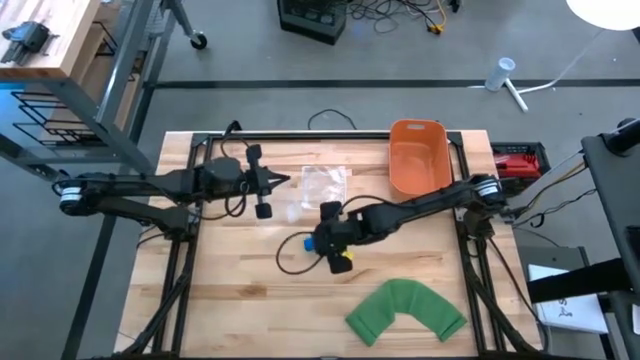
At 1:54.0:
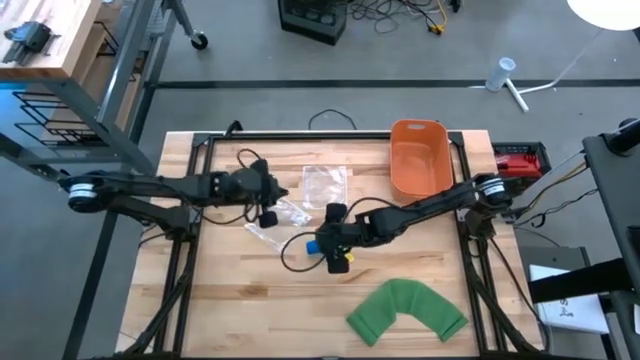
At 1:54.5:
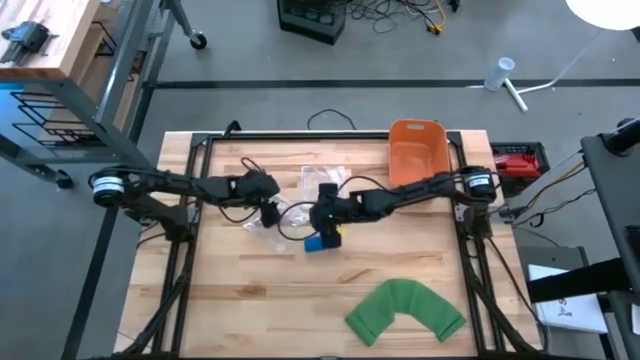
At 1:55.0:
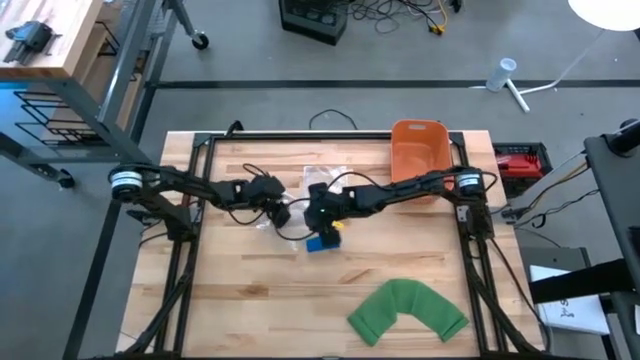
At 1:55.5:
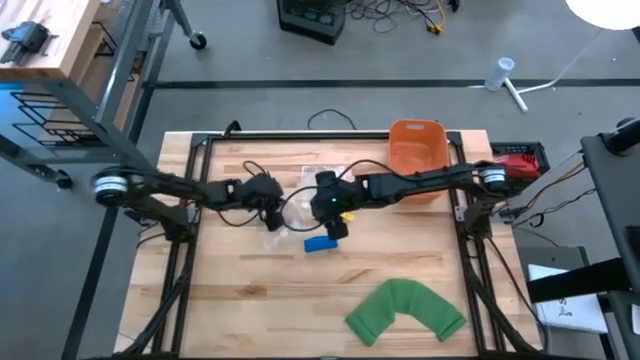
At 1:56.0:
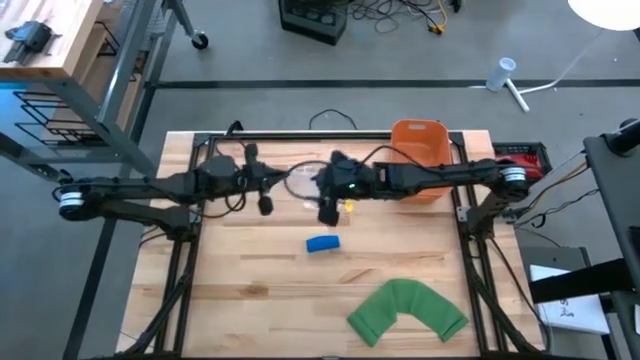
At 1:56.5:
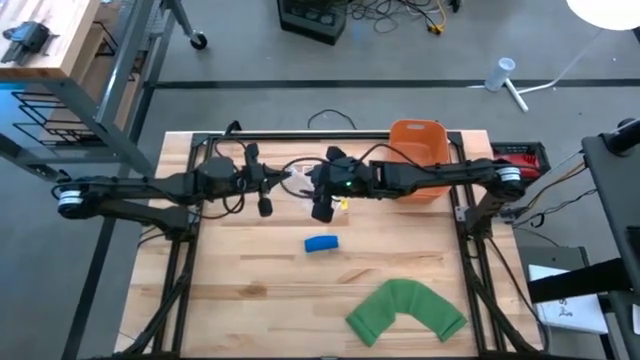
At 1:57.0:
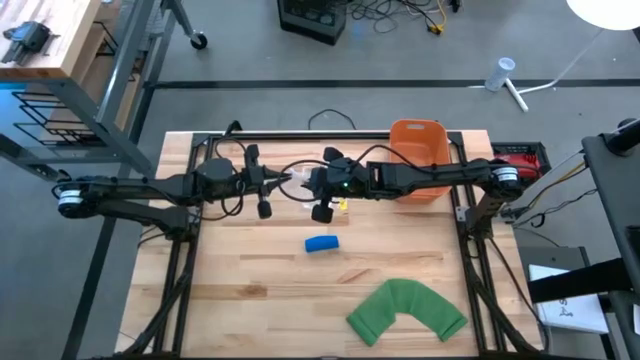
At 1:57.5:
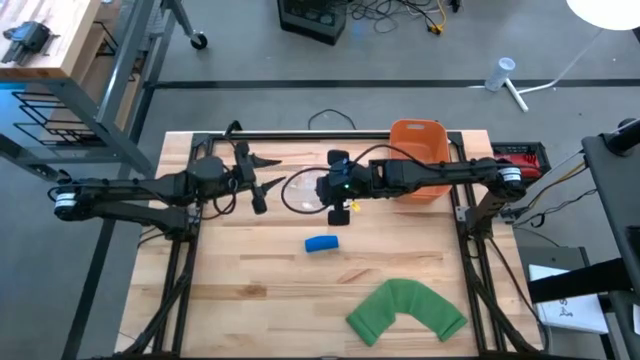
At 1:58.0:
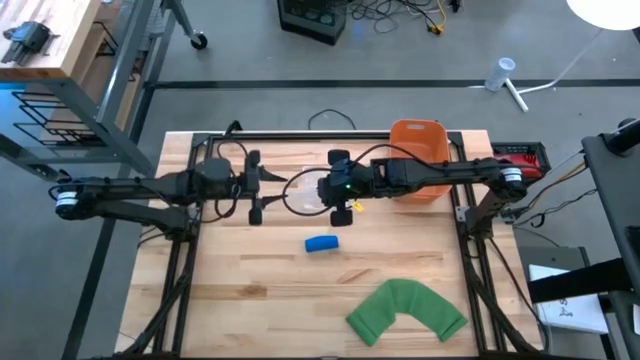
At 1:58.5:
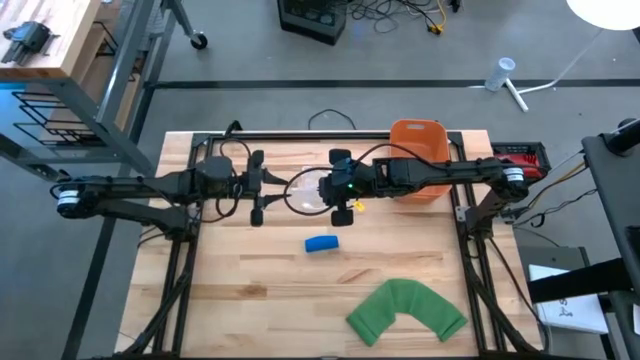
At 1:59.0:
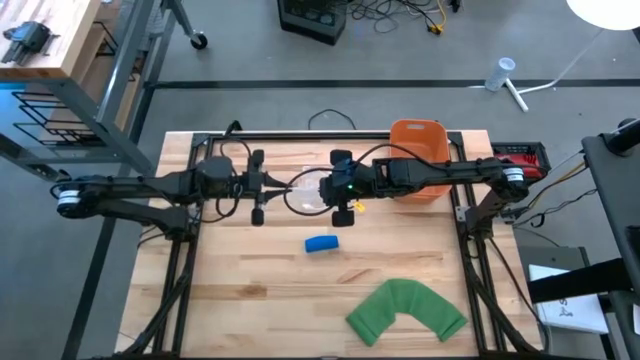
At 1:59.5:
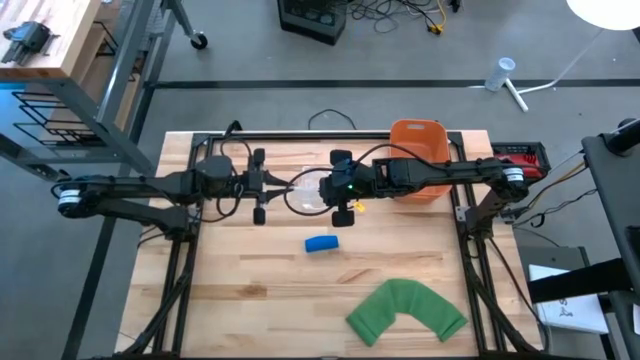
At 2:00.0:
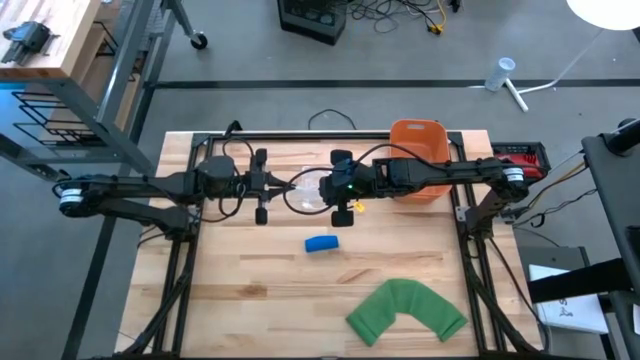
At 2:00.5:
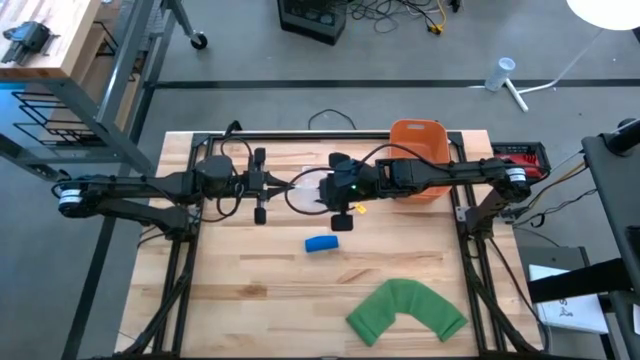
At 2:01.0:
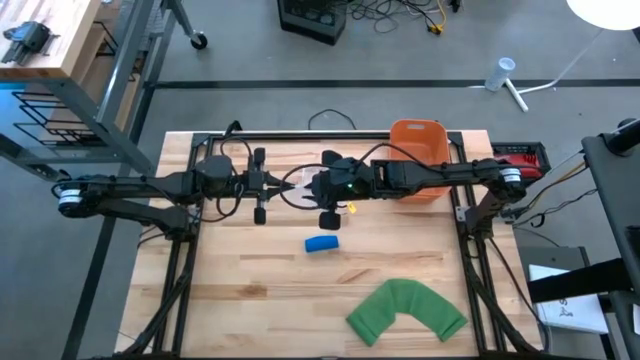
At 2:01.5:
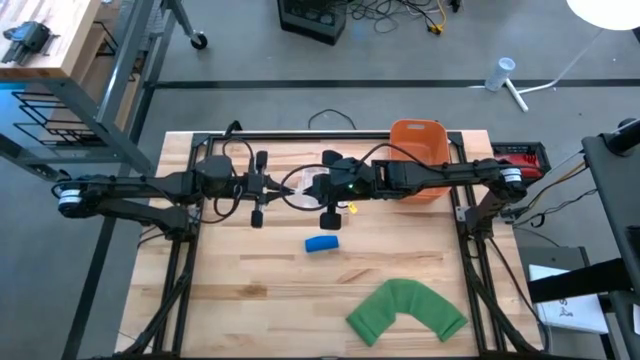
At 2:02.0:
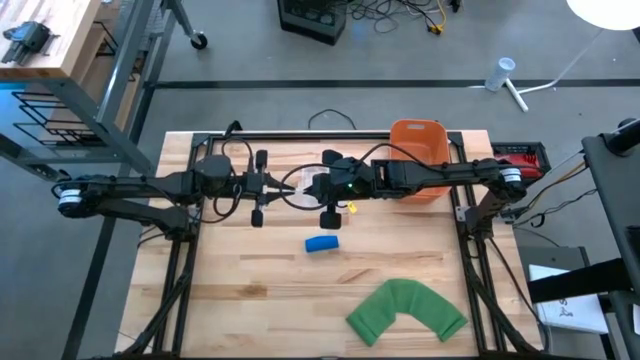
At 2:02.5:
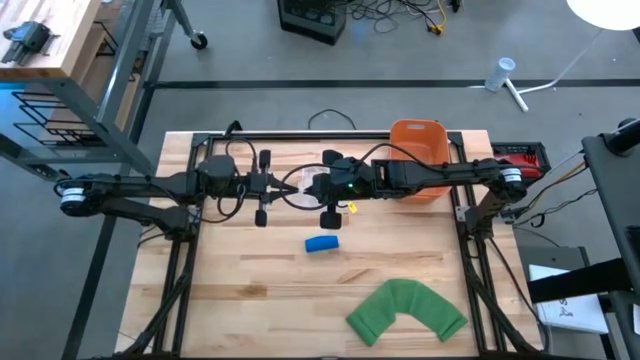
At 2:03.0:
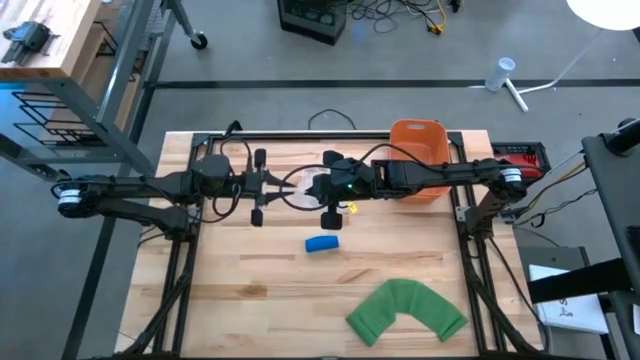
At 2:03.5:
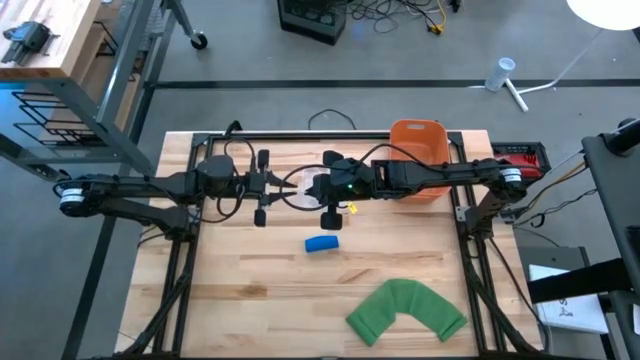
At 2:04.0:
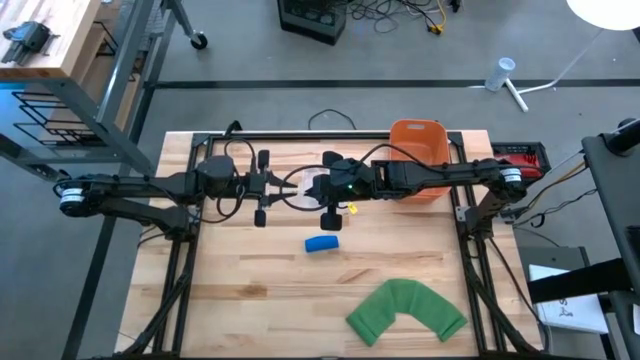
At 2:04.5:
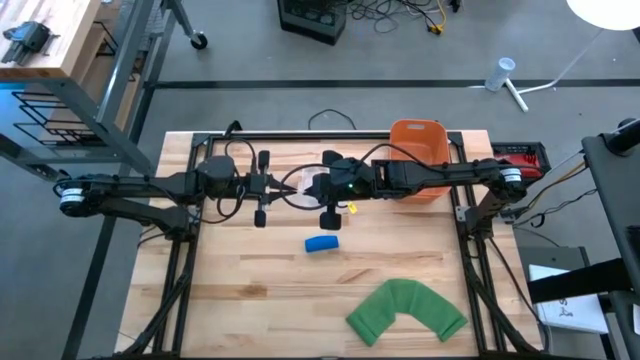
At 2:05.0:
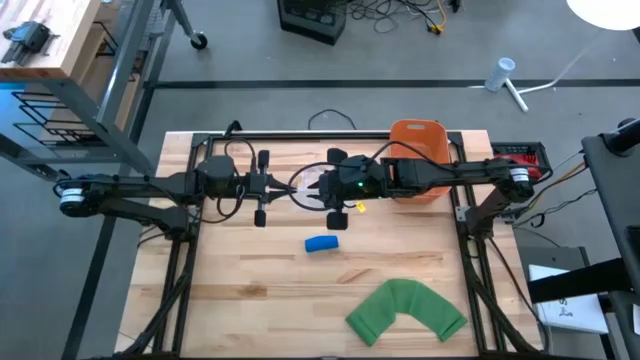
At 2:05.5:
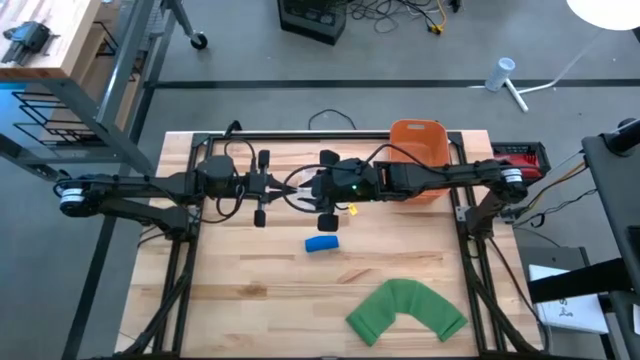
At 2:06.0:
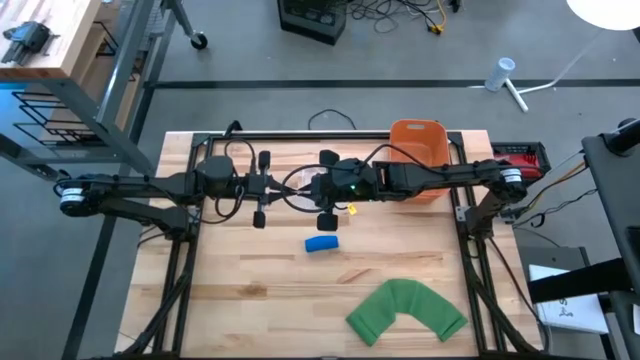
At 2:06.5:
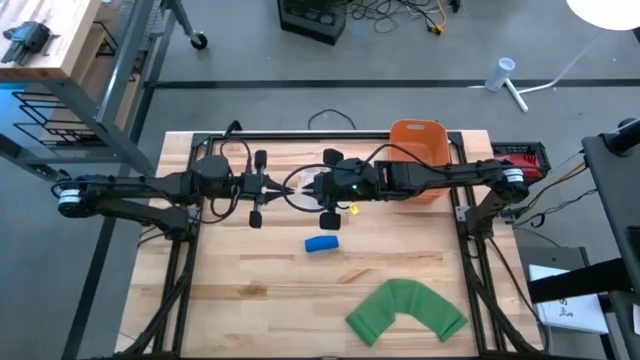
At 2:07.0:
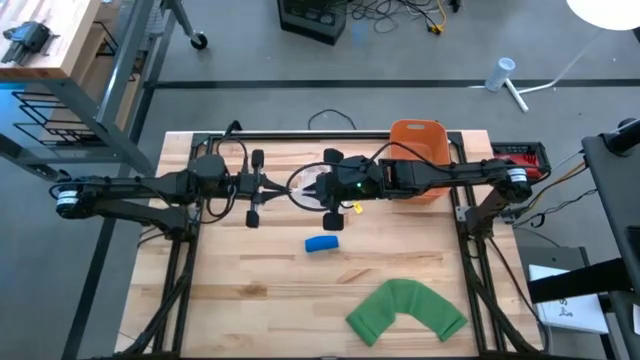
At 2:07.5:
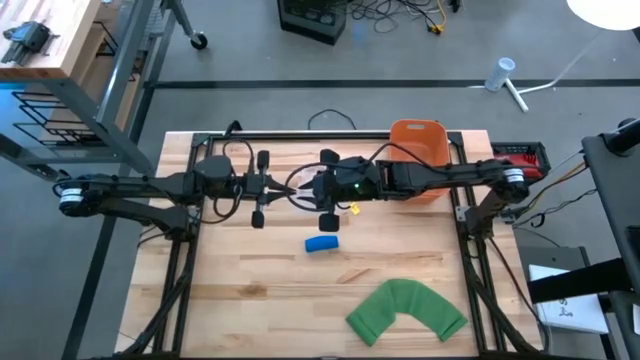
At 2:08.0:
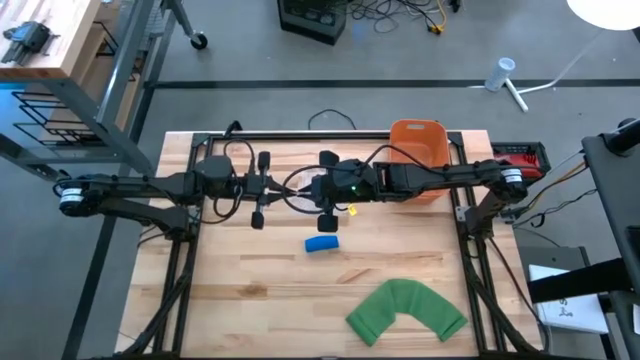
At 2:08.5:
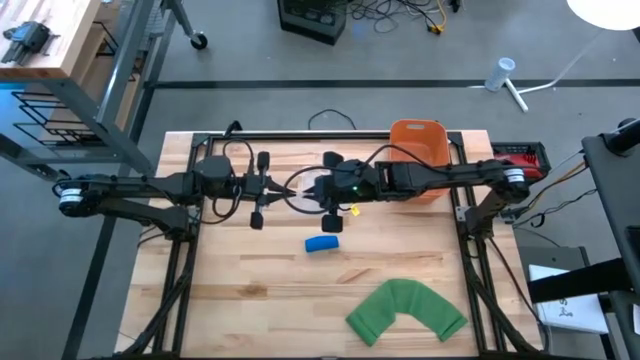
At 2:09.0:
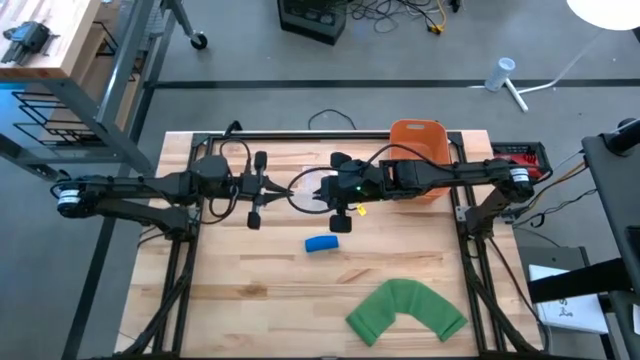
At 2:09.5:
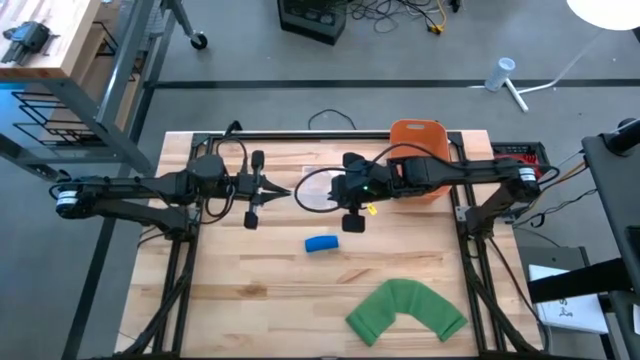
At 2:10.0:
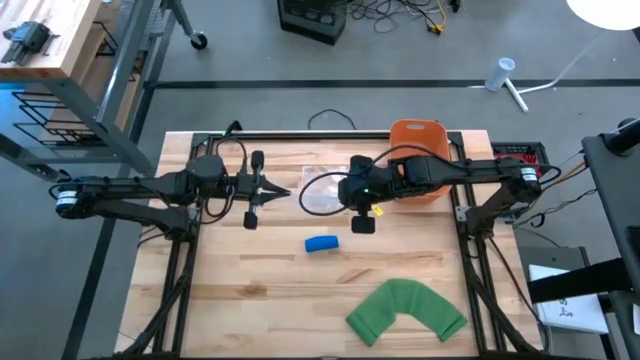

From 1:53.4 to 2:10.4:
Task: Roll bandage
Open the left zip bag

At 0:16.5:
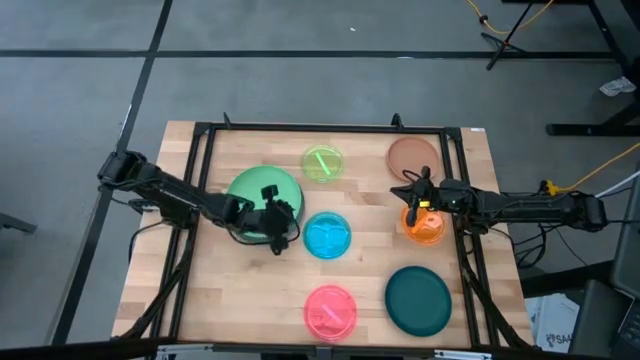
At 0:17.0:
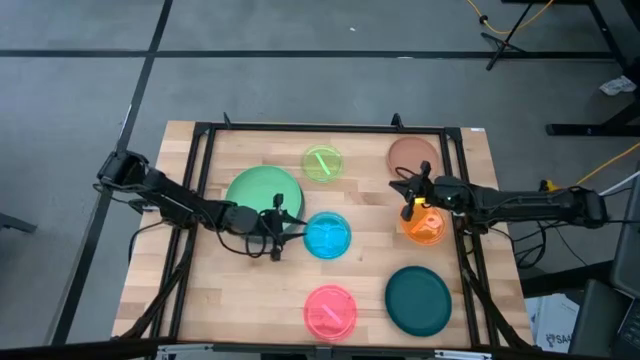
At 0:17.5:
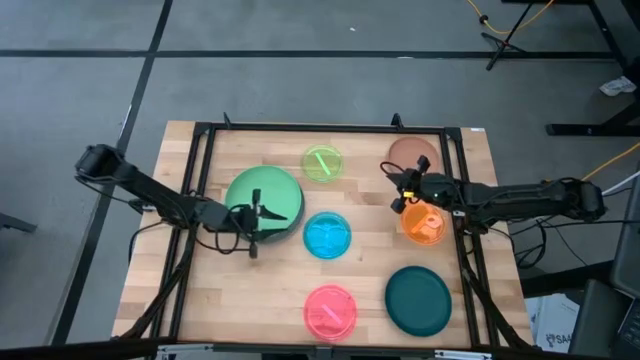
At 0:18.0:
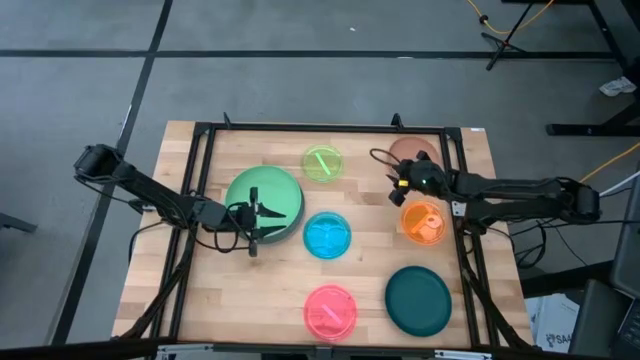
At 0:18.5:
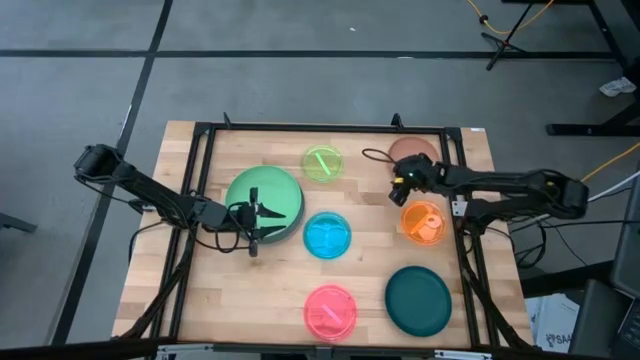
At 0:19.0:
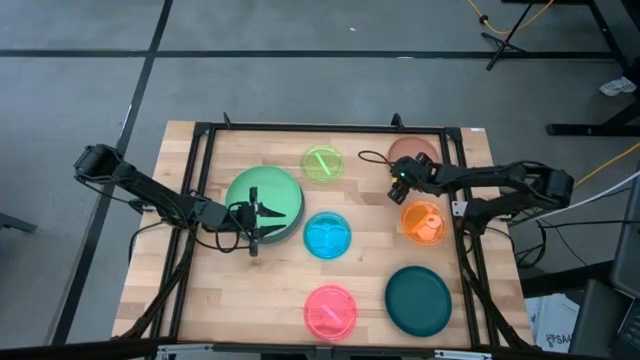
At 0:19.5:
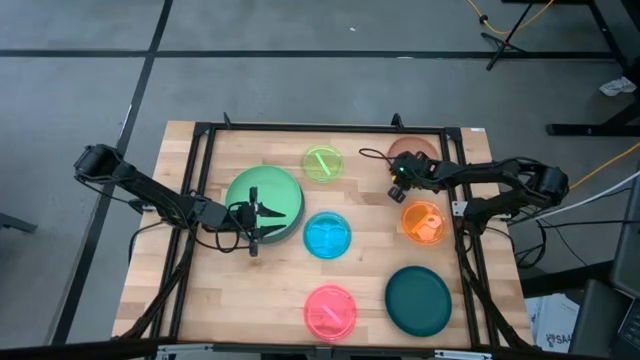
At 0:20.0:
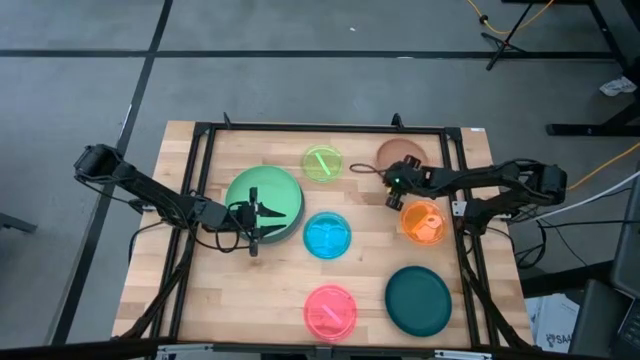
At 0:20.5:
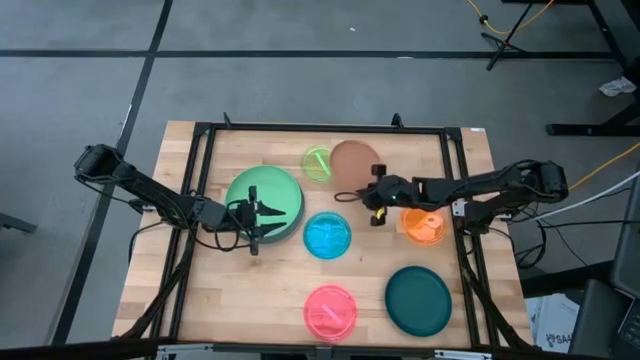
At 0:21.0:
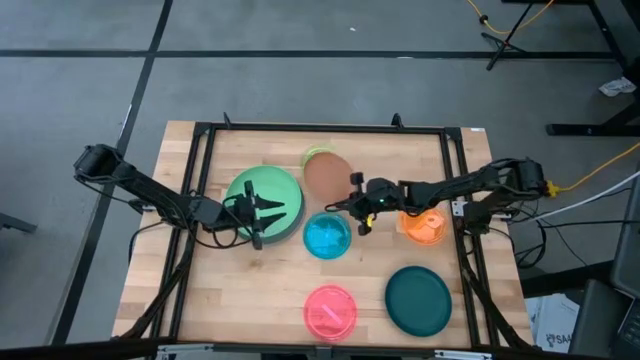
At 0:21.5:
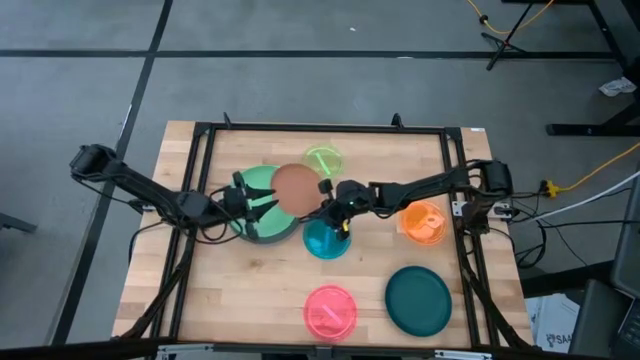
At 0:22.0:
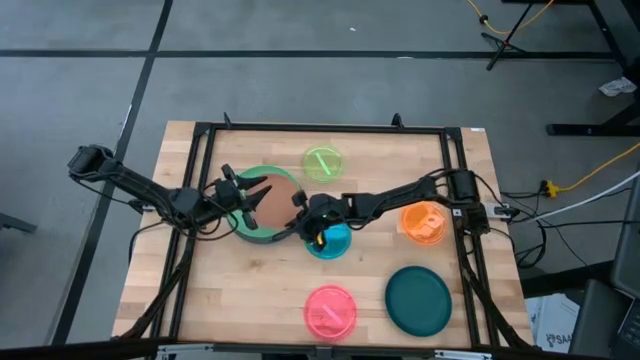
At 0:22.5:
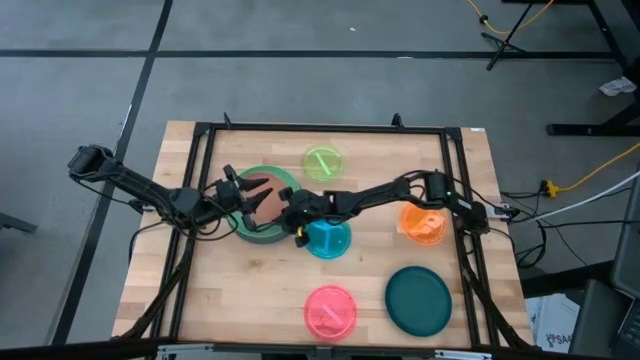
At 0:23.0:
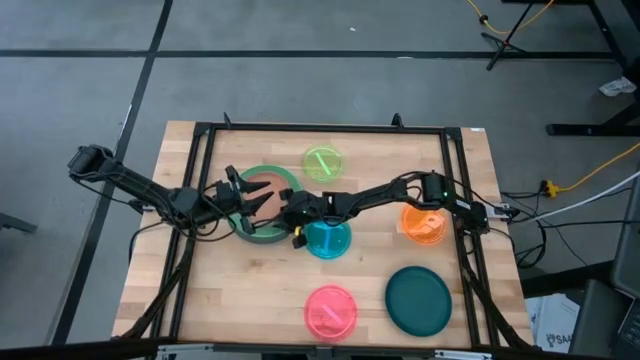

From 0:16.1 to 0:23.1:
Task: Stack plastic plates
Stack the brown plate on top of green plate
